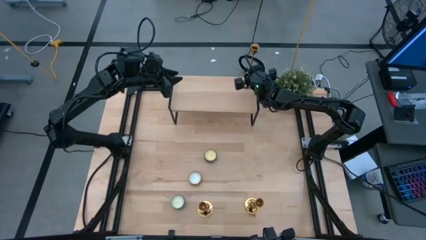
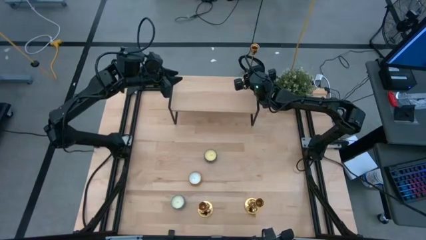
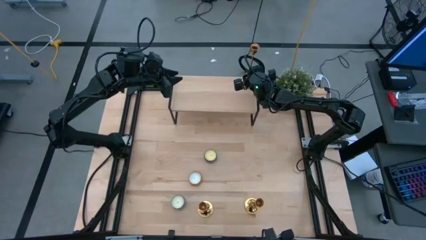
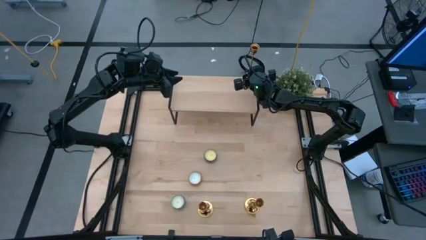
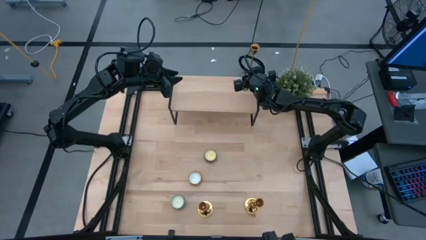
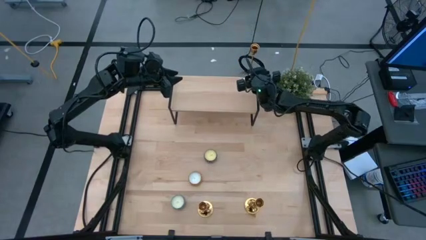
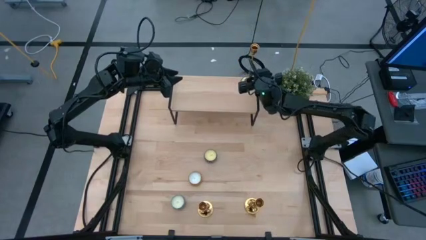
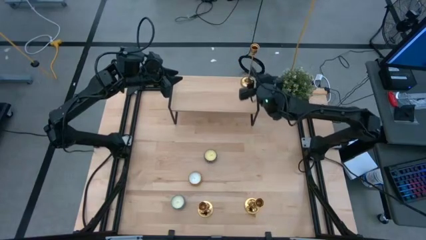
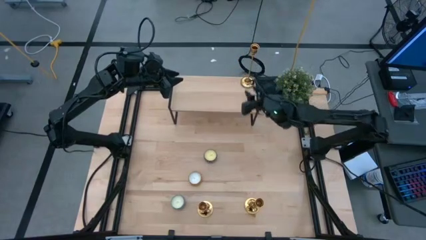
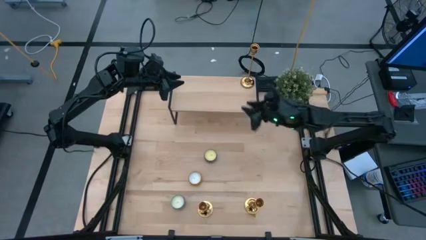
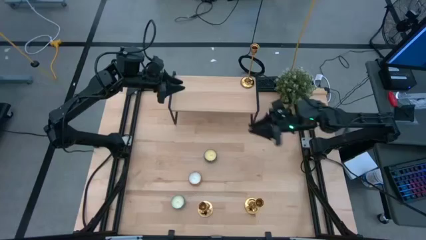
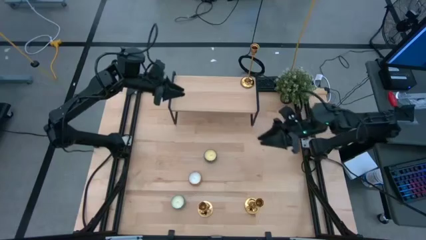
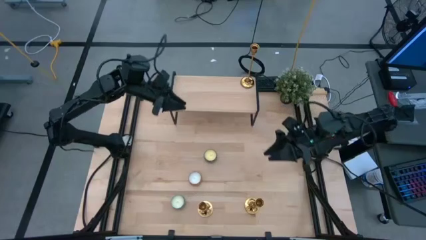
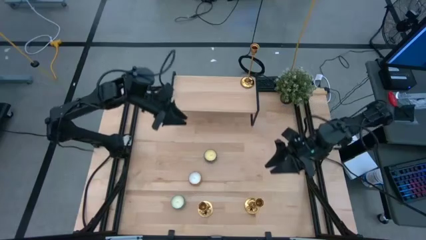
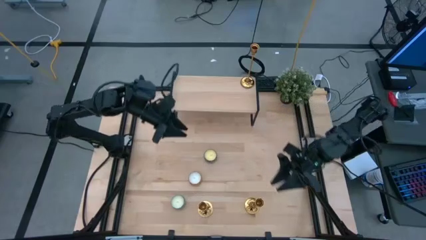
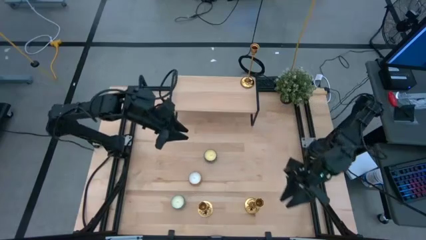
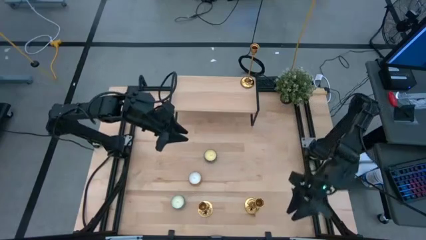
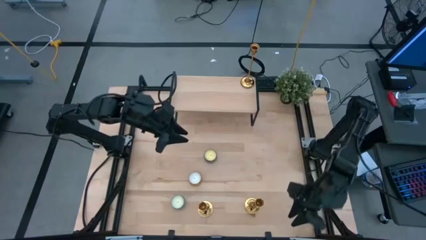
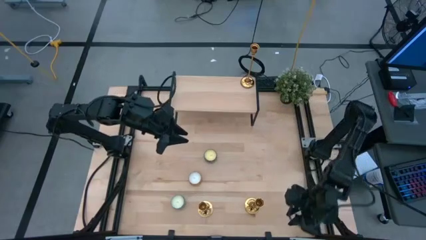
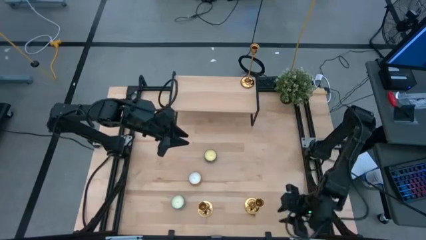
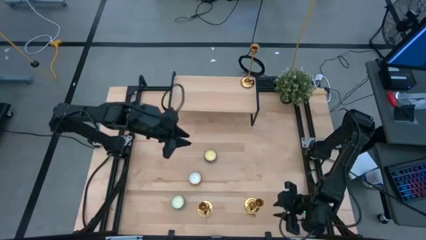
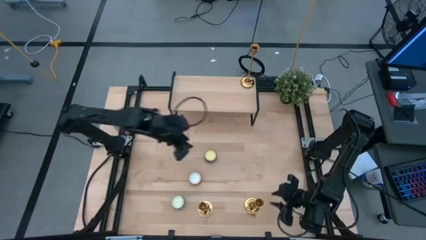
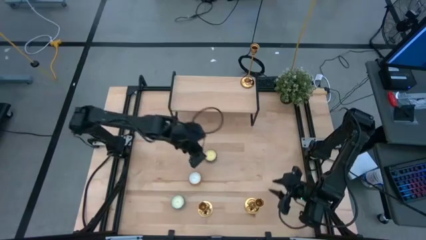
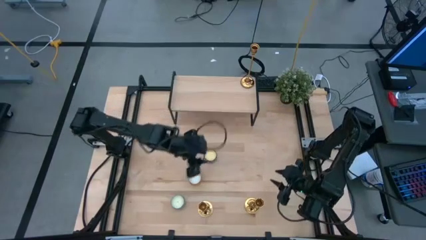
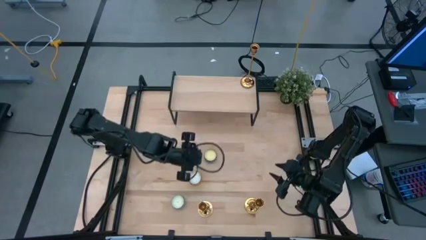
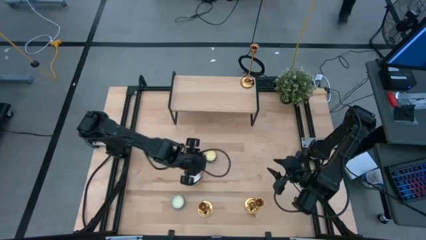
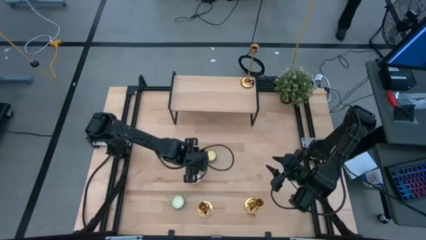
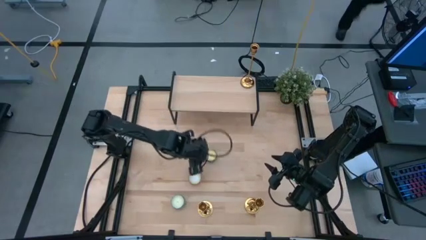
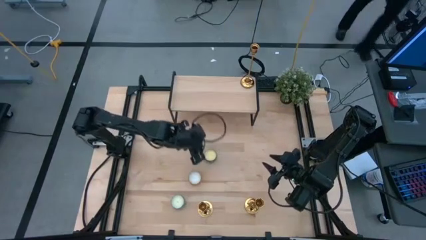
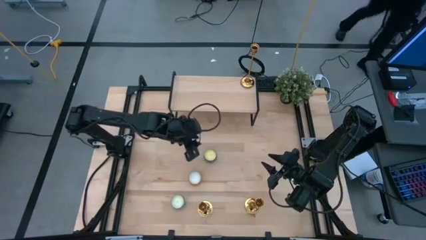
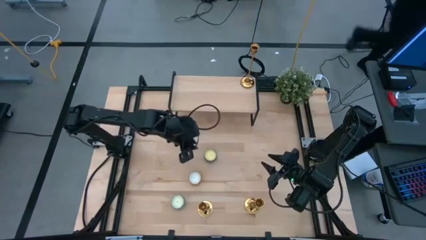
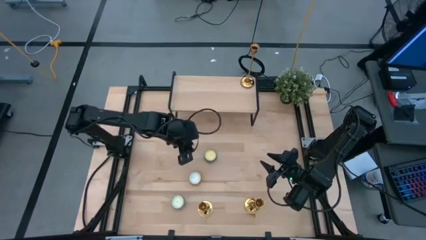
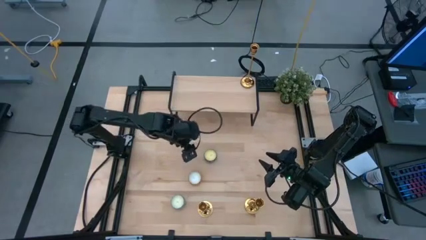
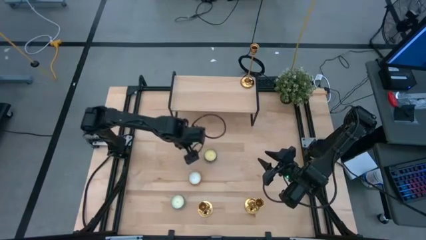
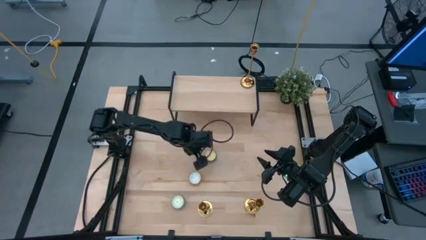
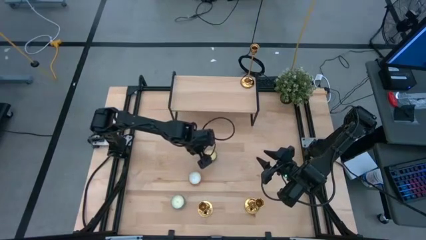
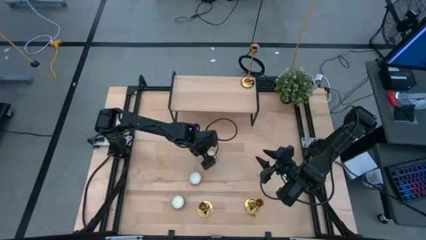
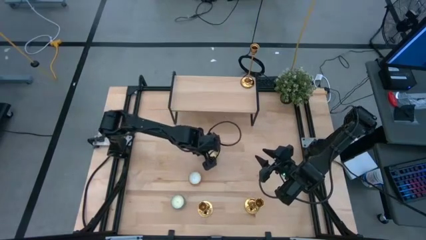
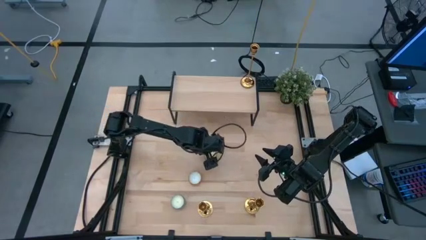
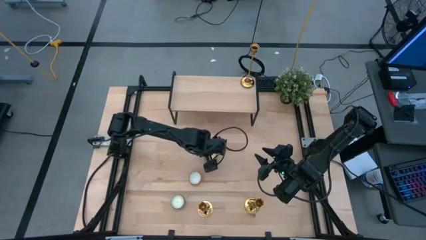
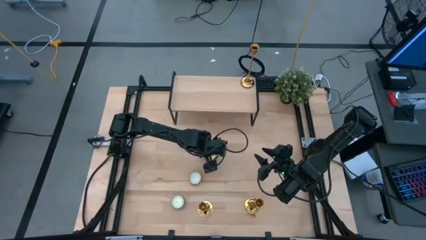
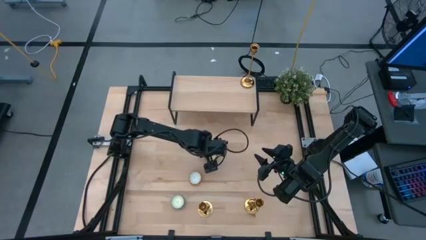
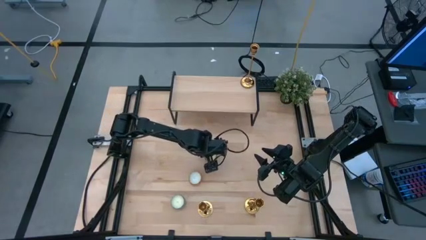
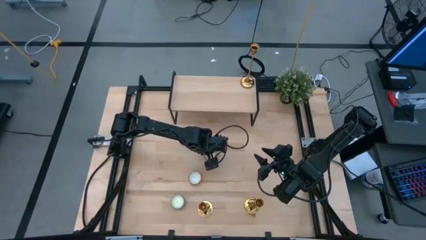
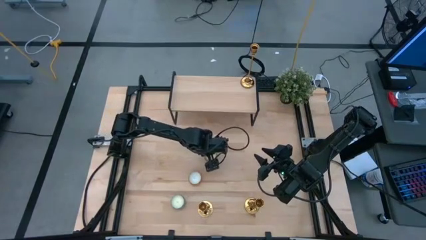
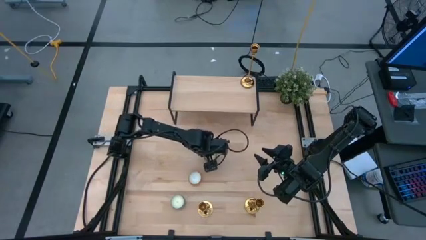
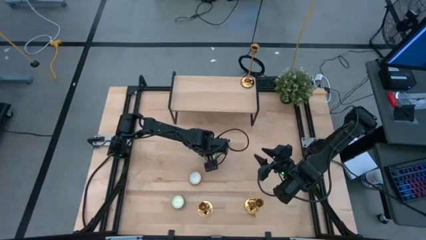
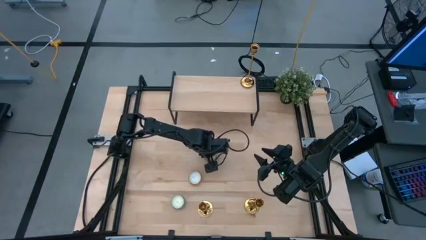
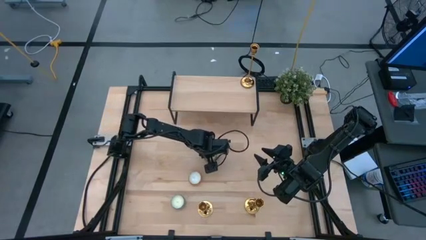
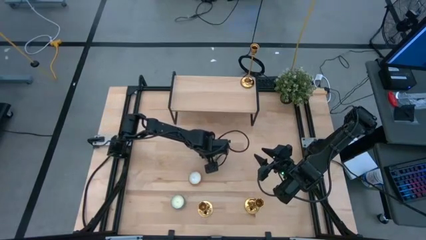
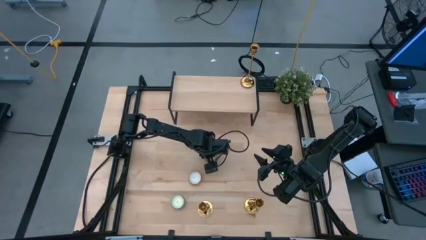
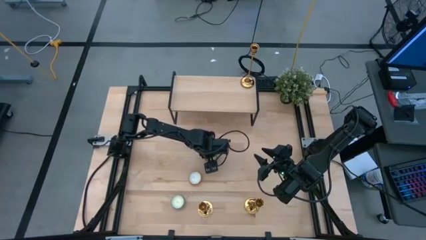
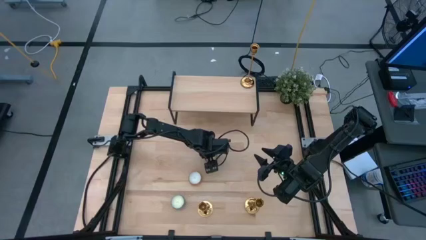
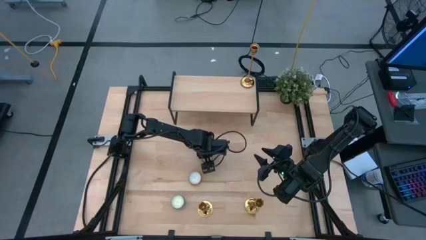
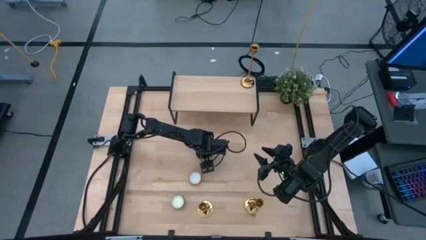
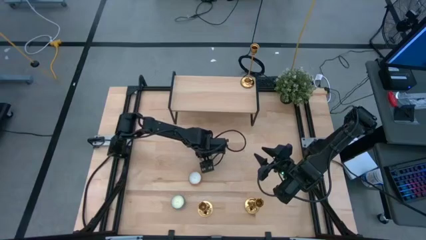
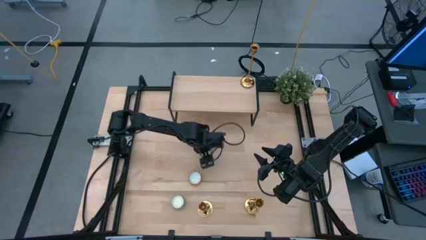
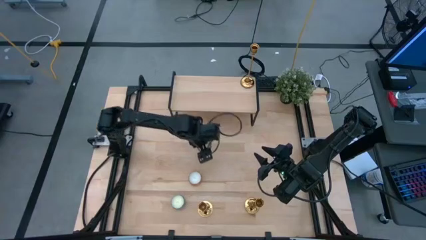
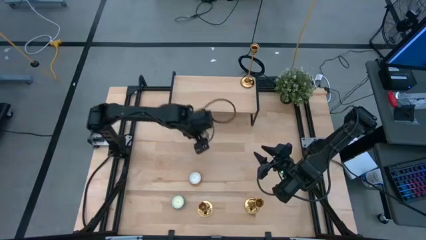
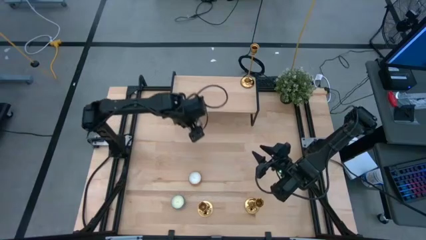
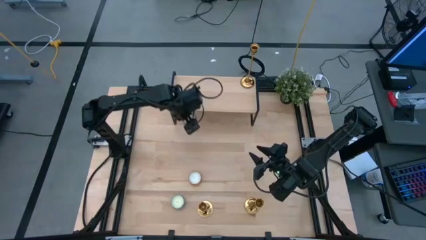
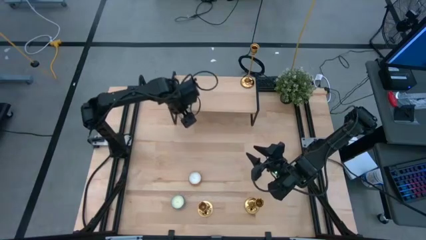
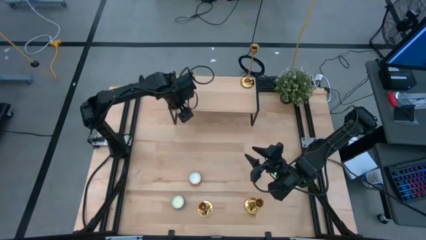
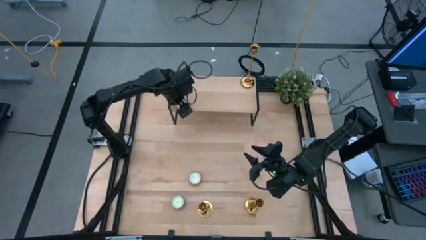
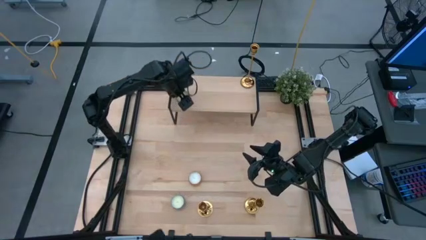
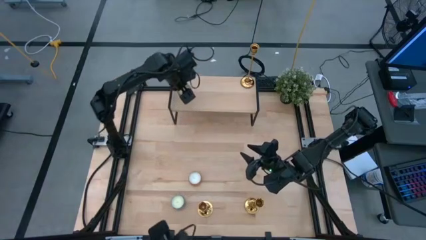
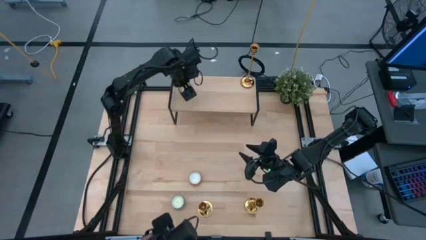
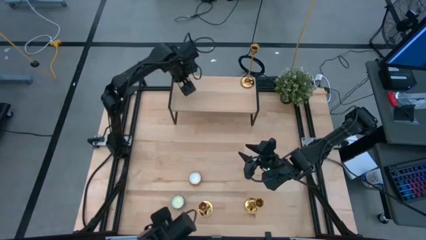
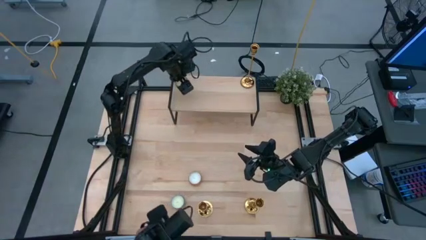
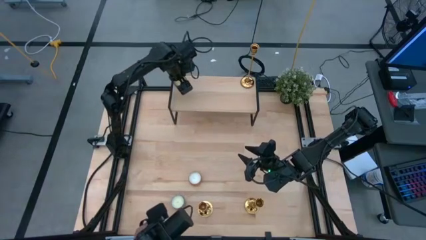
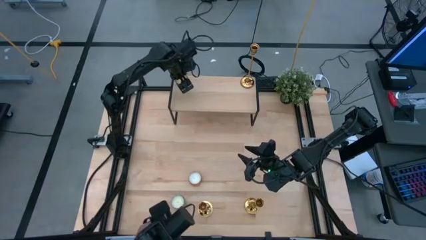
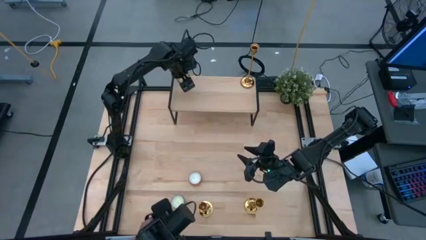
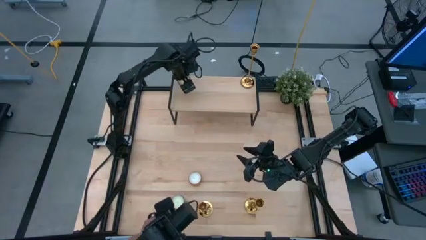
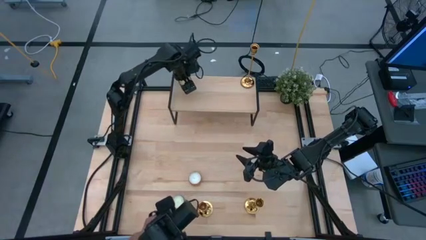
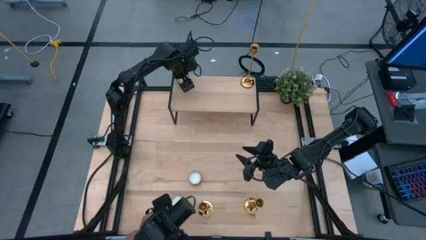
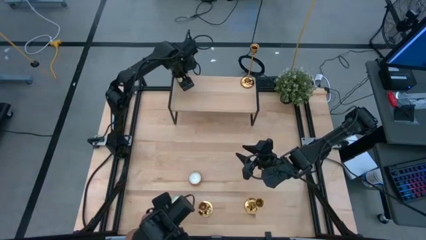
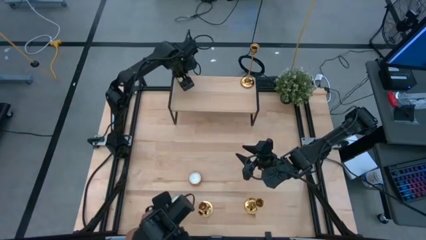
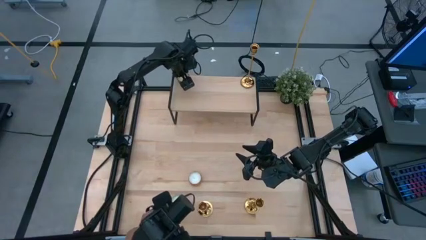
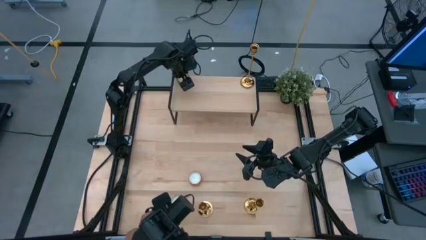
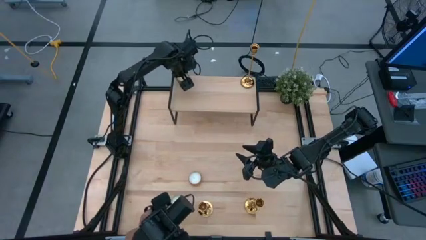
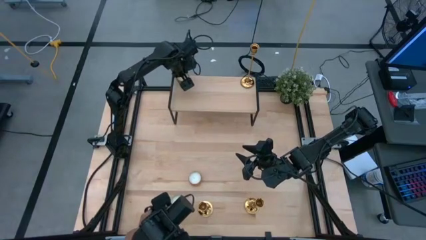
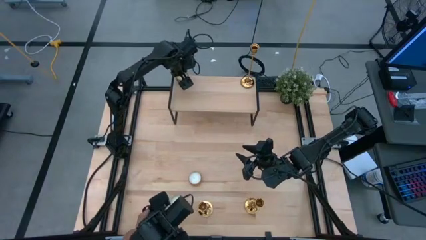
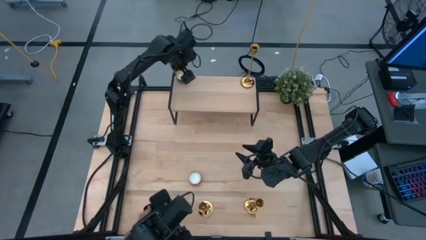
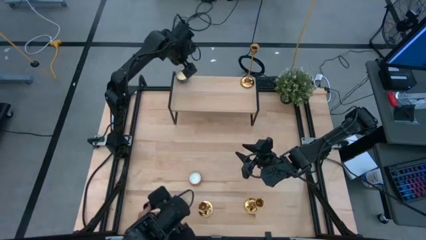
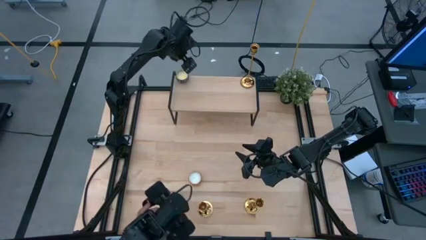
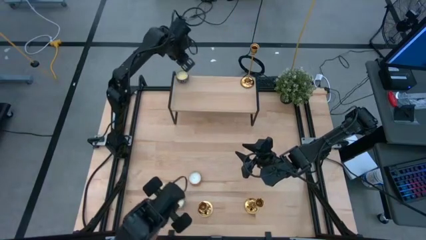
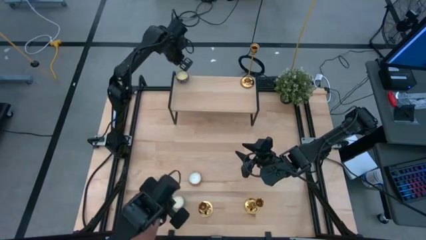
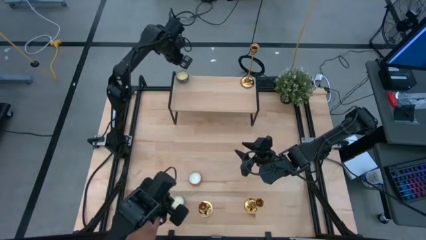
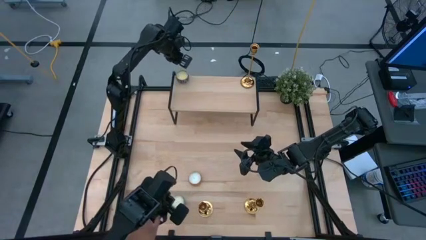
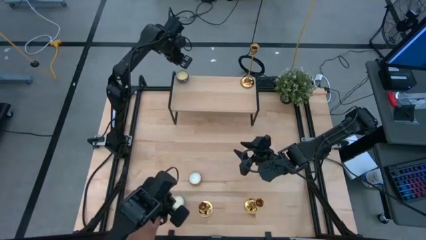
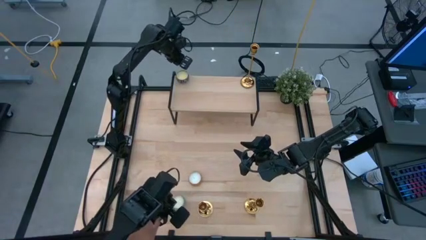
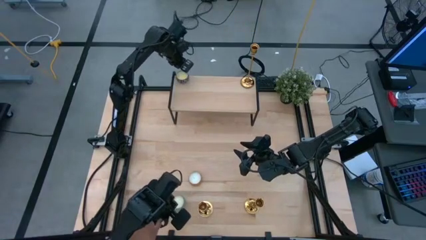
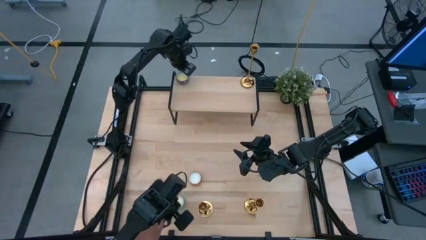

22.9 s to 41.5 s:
Task: Pick & Place candle stick holders
Put the black patterned scented candle on the shelf
